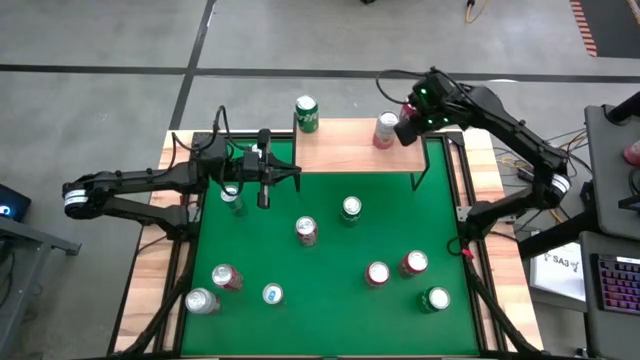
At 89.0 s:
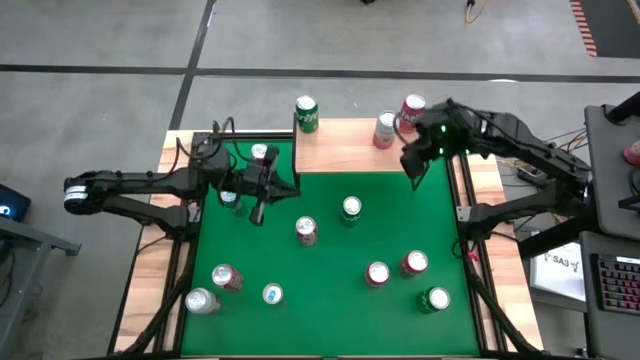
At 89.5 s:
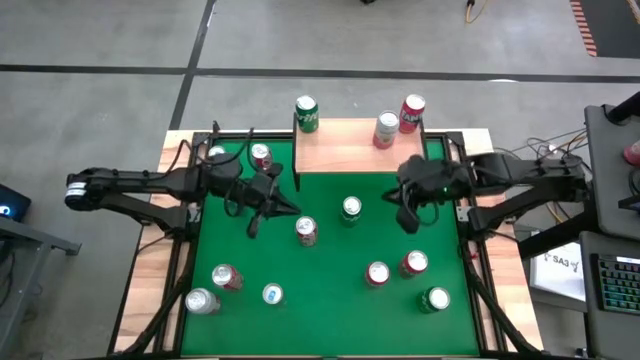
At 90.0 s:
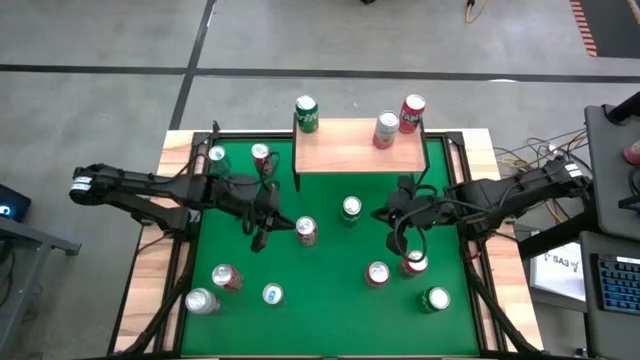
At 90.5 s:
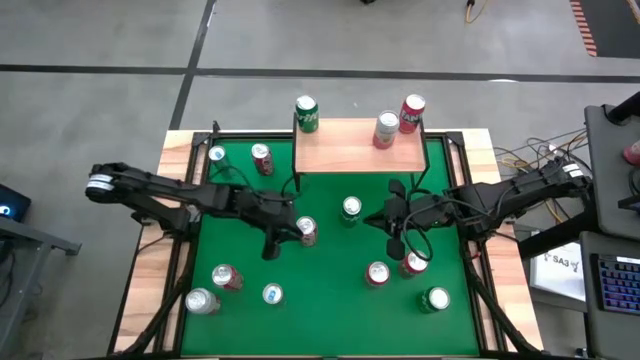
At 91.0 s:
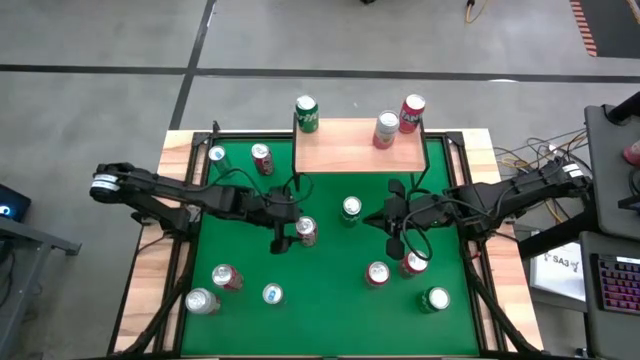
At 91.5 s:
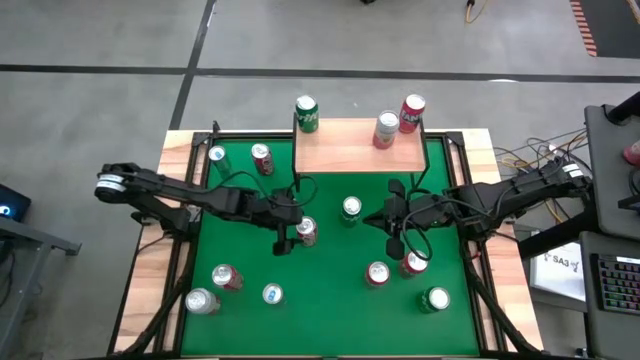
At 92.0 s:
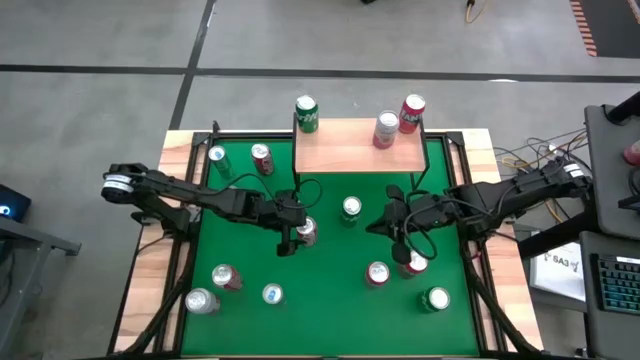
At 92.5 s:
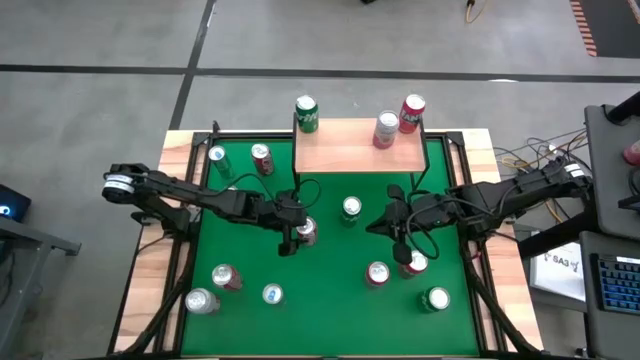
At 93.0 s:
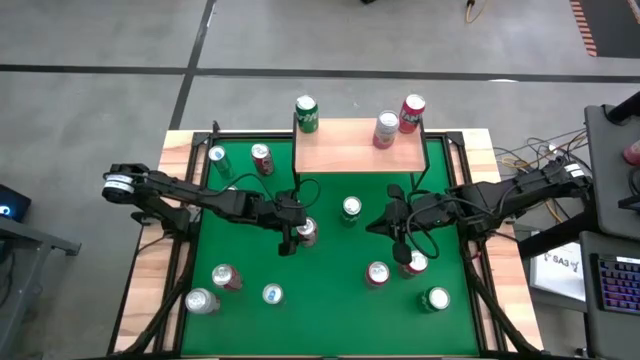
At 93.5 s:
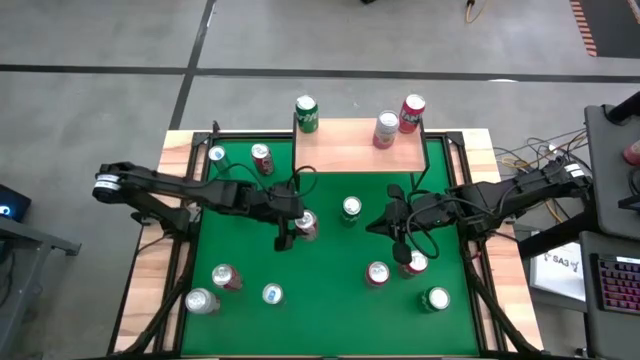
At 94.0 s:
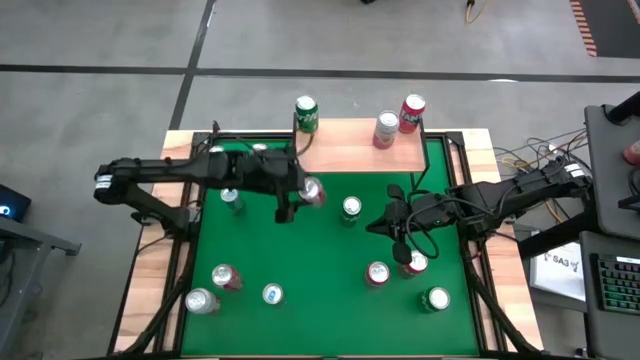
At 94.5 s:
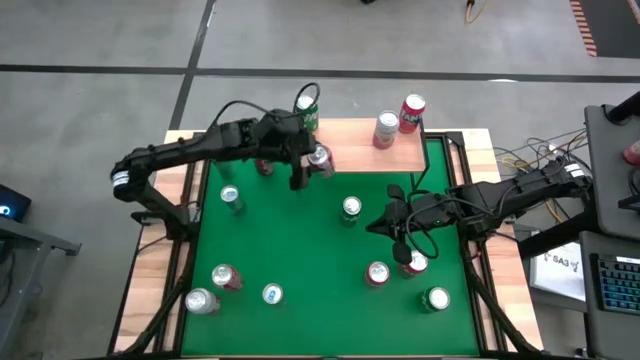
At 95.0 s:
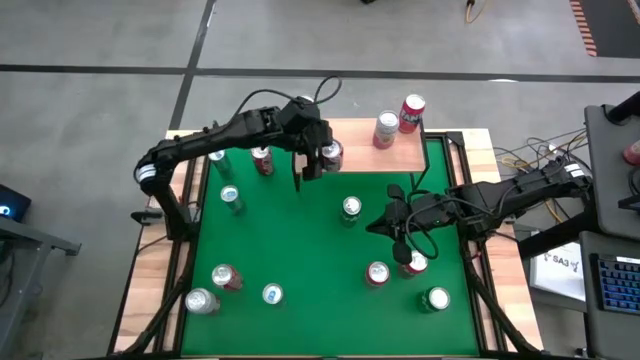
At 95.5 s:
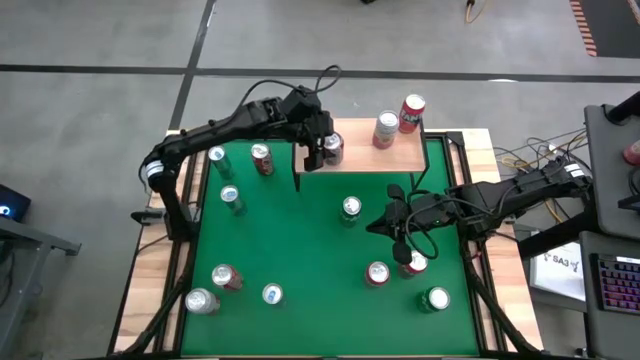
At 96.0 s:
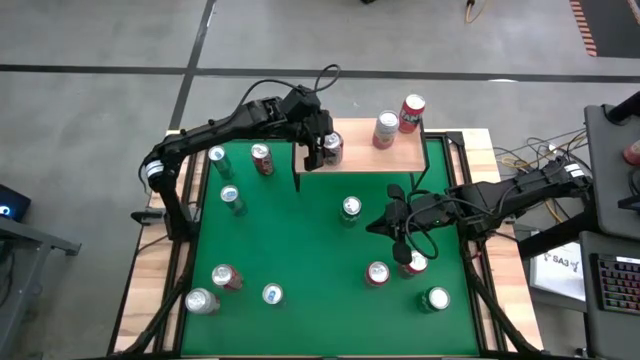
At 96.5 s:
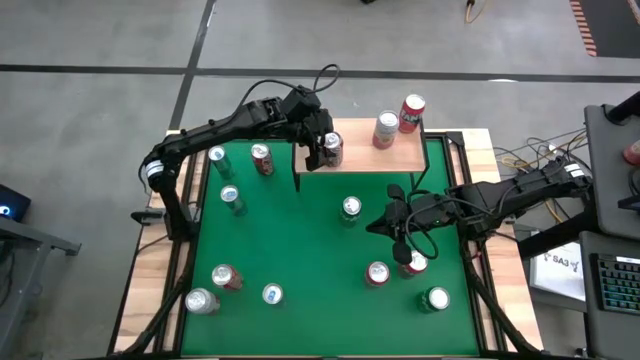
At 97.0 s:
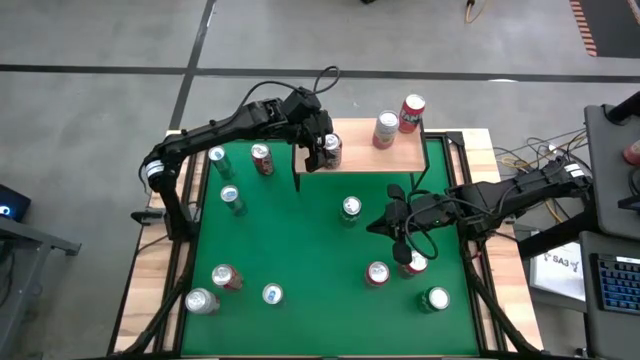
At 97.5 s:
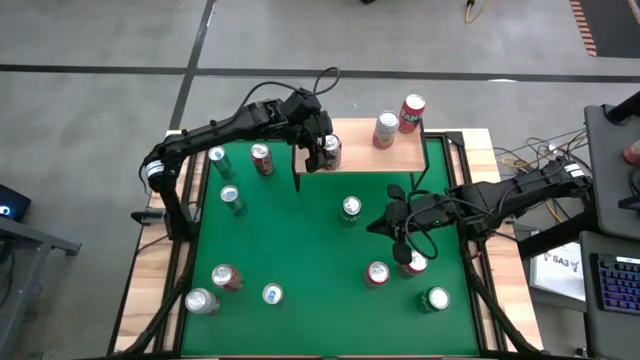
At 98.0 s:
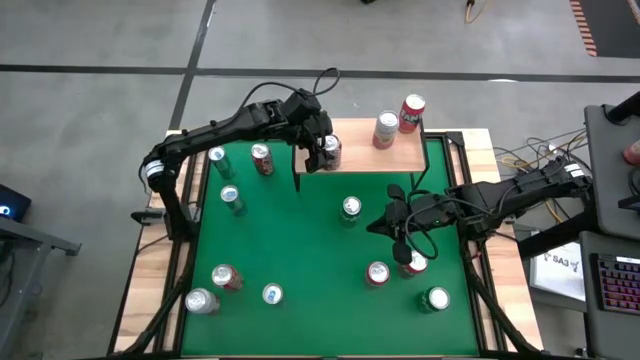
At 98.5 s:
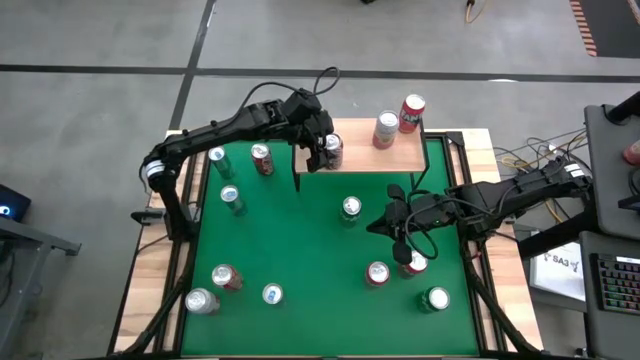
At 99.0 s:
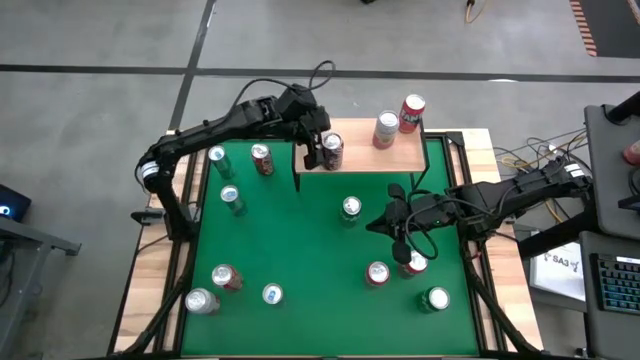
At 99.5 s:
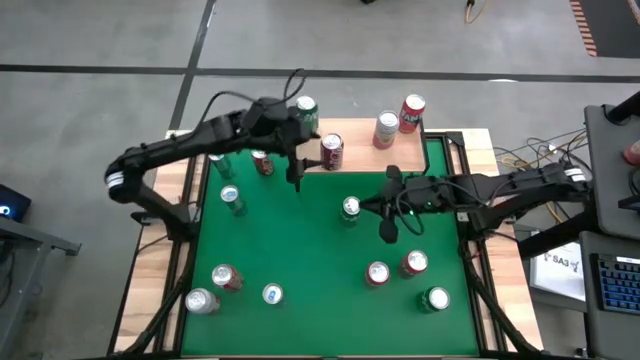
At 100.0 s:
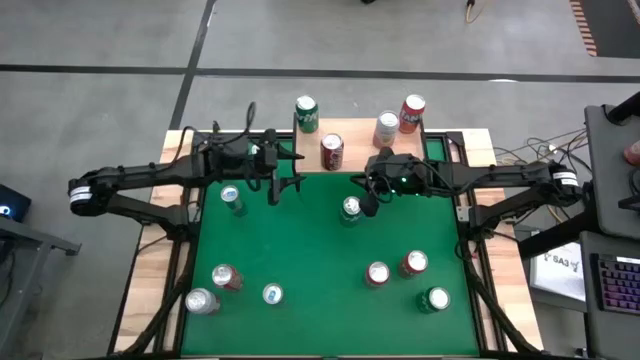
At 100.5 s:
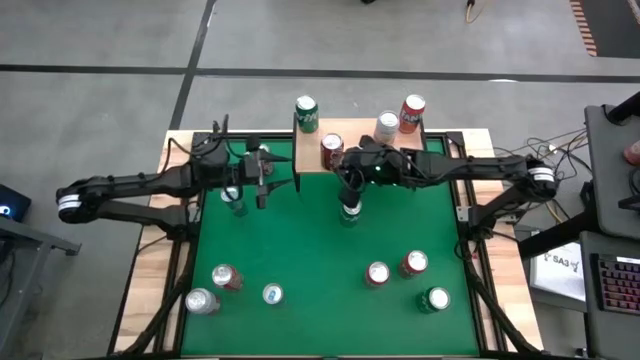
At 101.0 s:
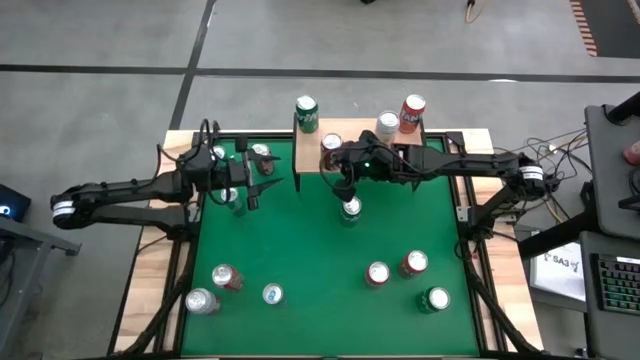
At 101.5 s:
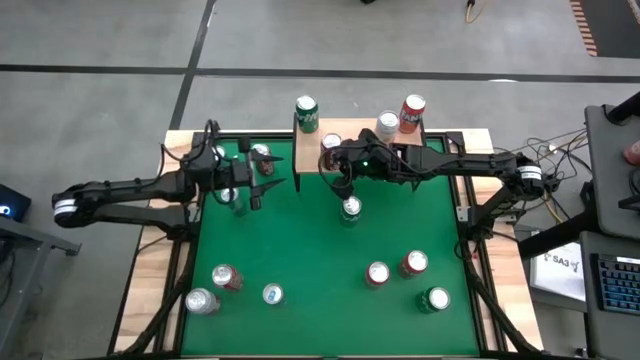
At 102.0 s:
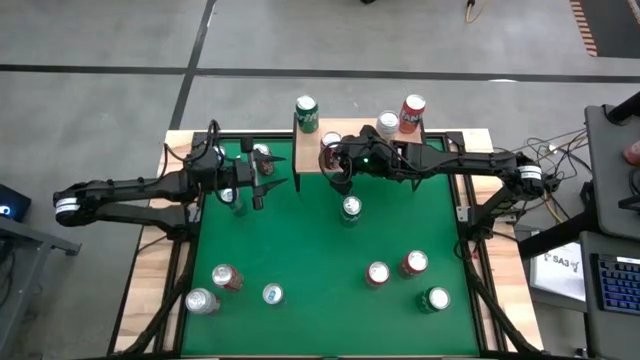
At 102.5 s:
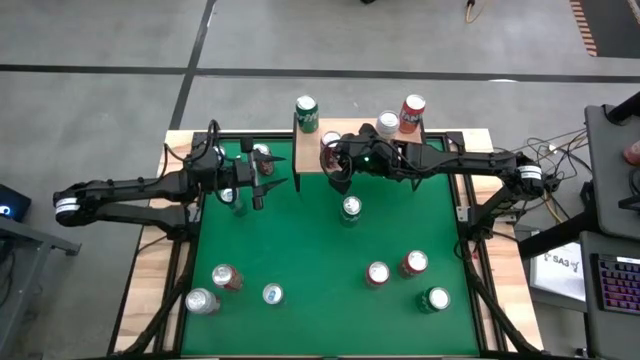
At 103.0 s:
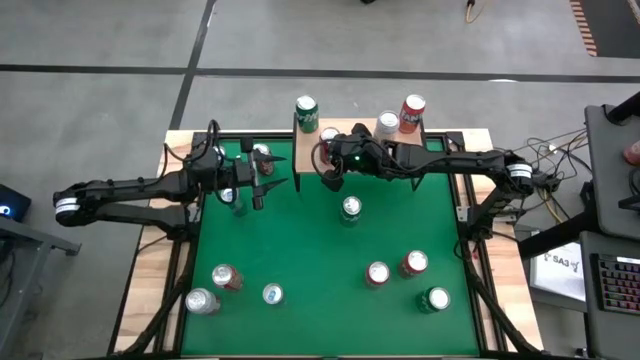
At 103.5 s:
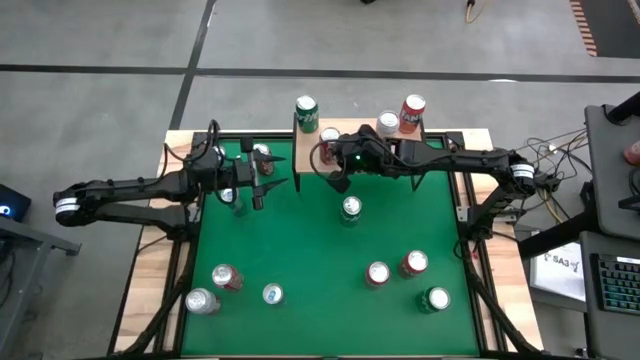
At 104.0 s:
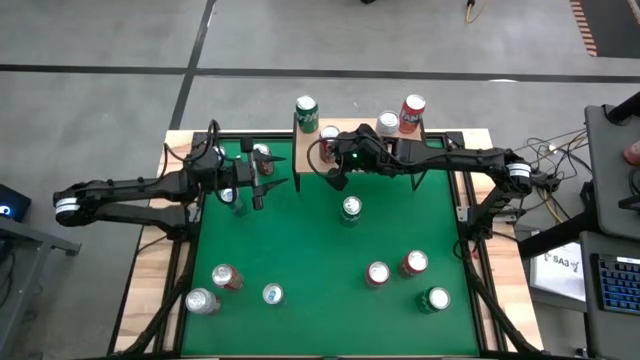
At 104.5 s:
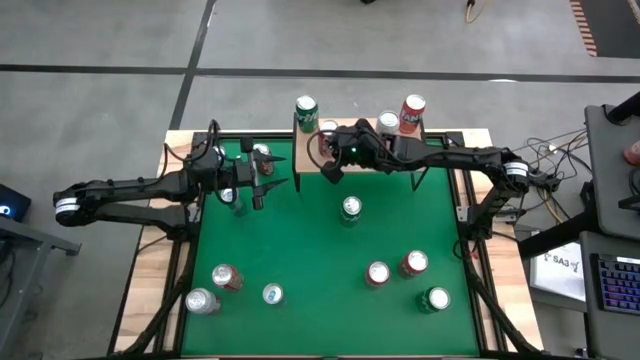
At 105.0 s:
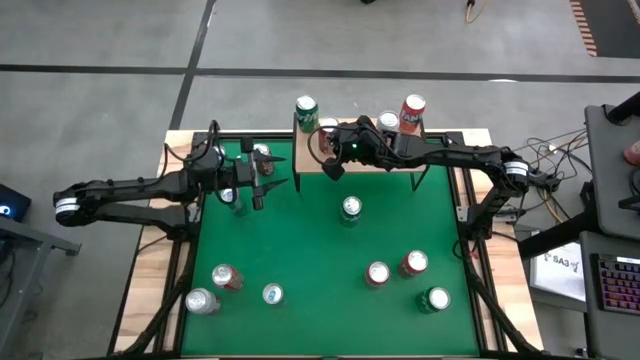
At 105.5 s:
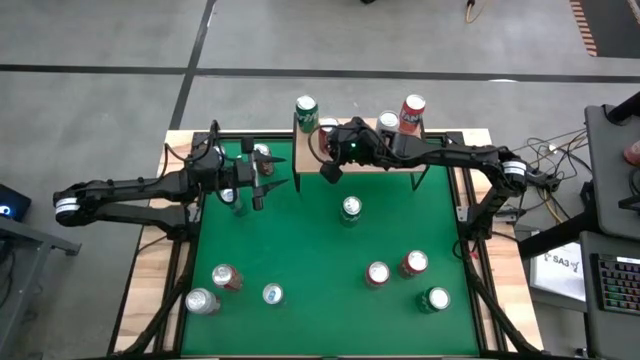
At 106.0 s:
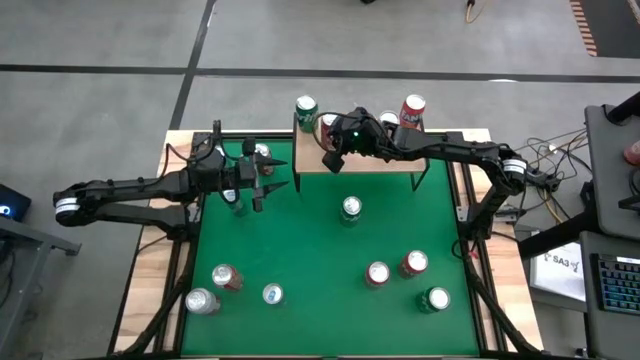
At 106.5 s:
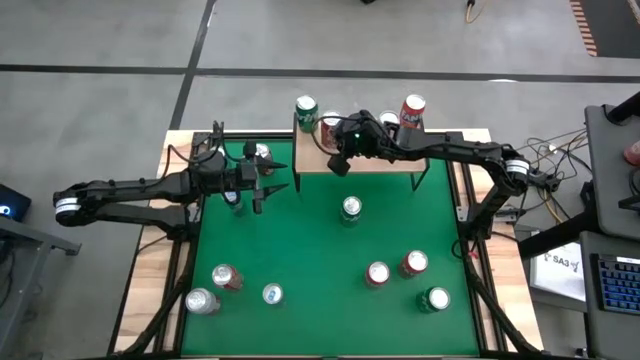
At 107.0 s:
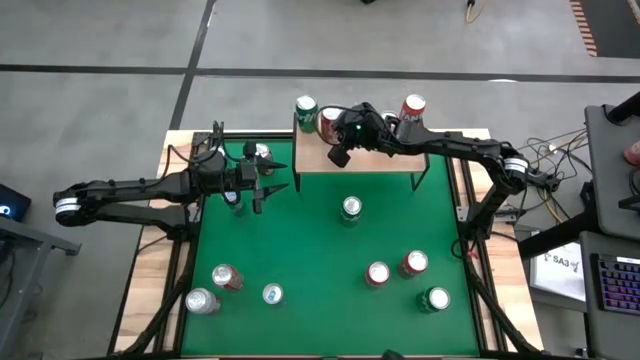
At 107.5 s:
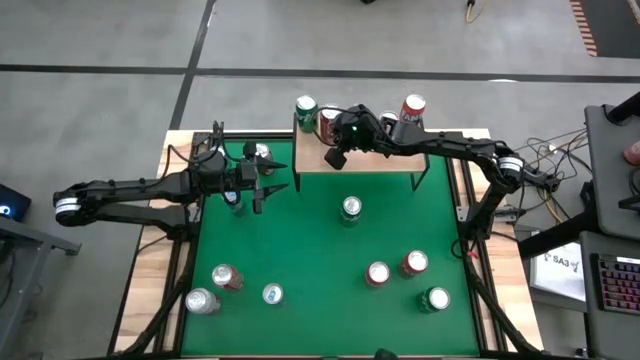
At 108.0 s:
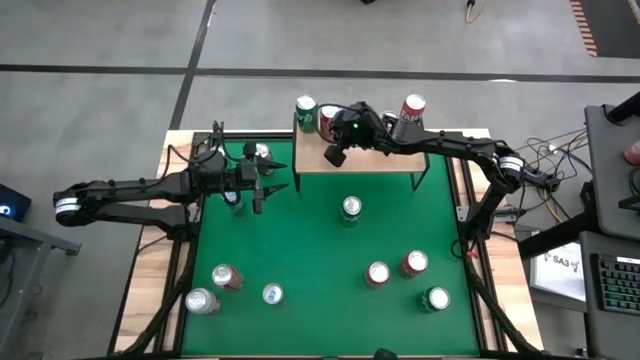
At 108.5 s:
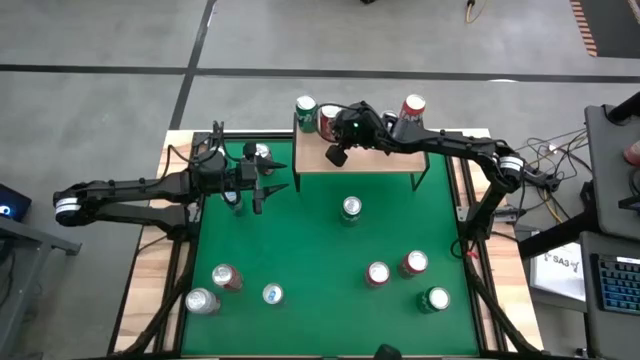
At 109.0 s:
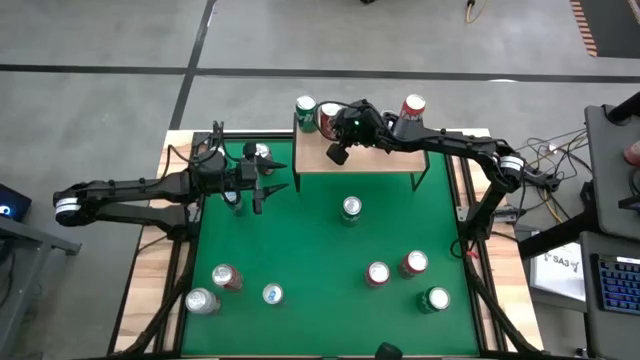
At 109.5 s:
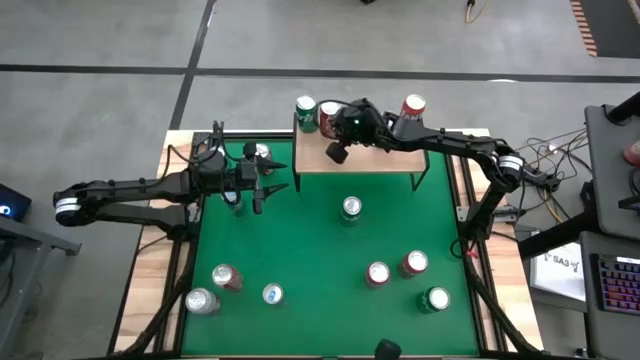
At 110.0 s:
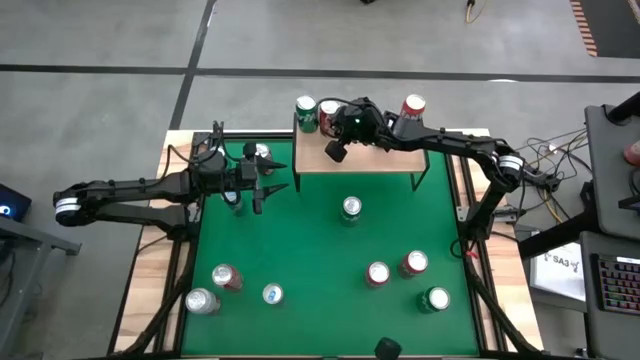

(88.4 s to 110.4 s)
Task: Place canned beverage on shelf
Put the middle red soda can on the shelf
